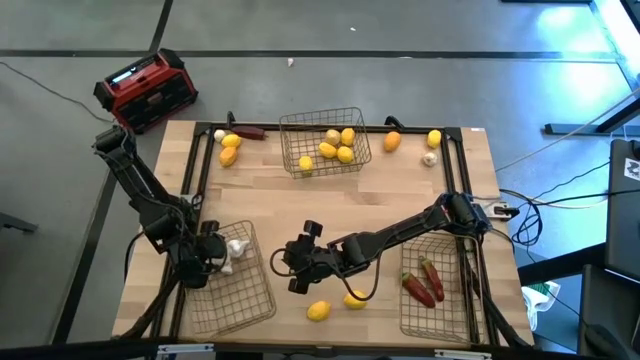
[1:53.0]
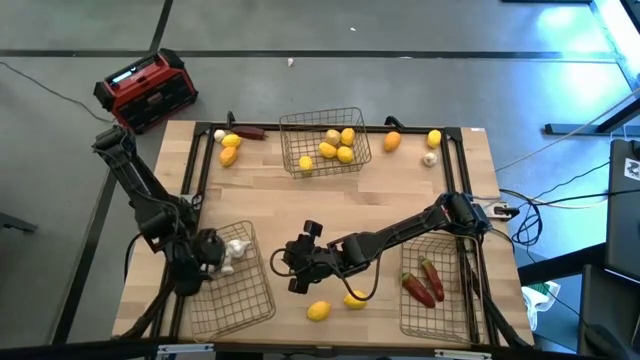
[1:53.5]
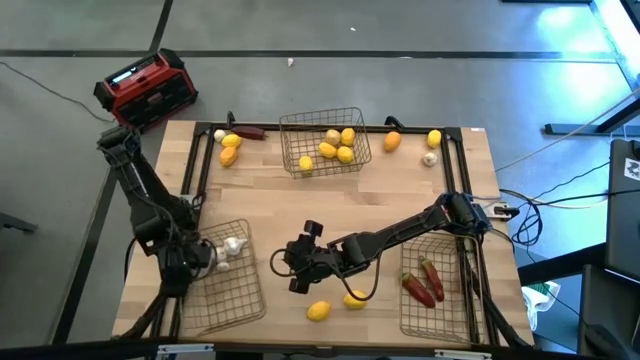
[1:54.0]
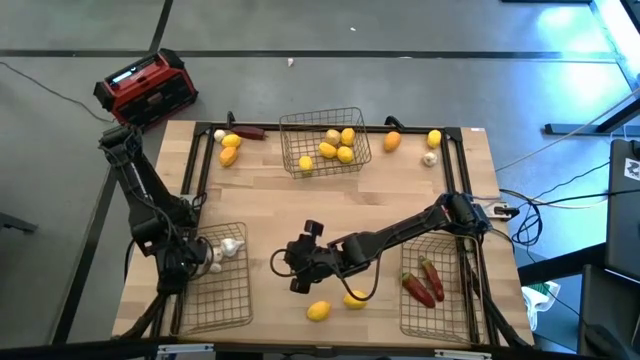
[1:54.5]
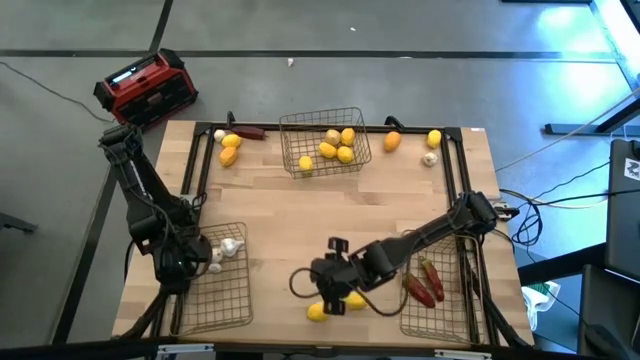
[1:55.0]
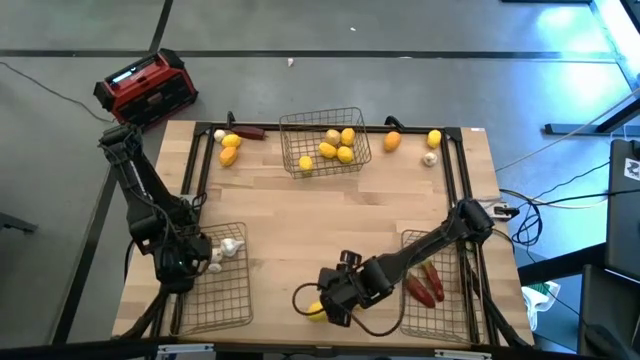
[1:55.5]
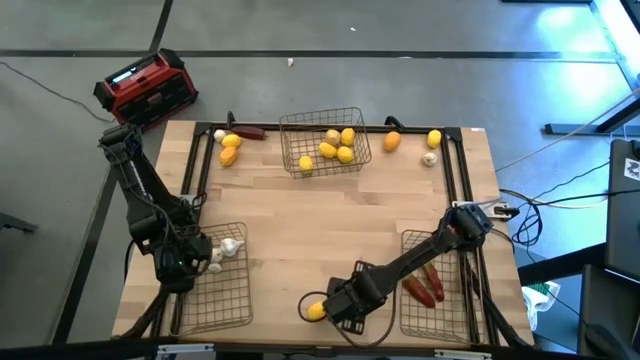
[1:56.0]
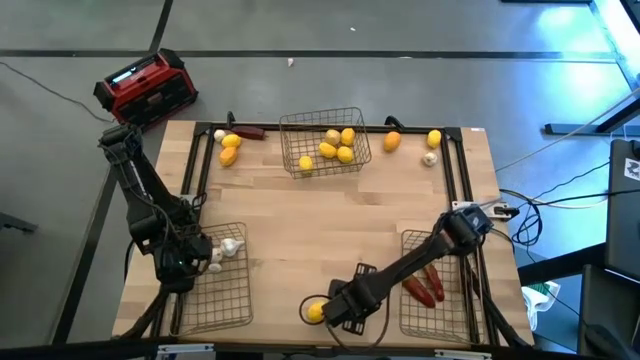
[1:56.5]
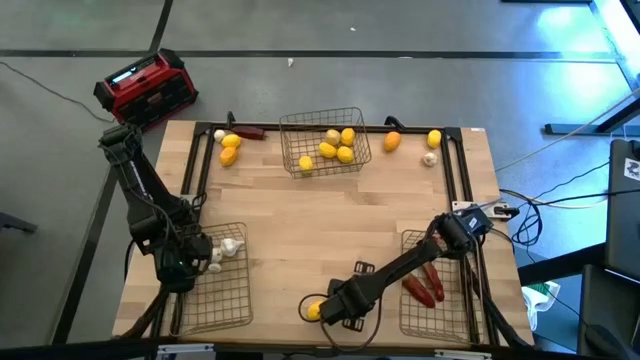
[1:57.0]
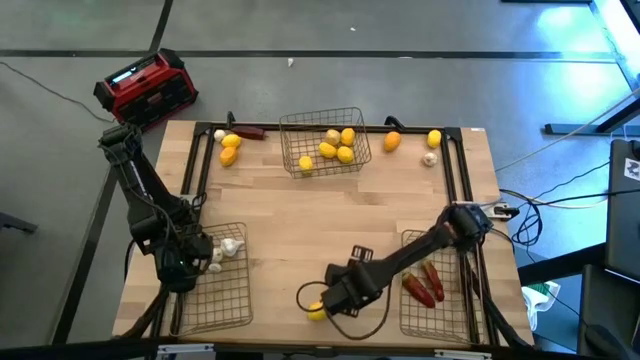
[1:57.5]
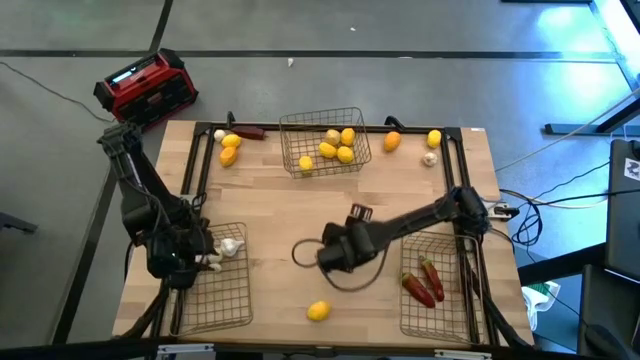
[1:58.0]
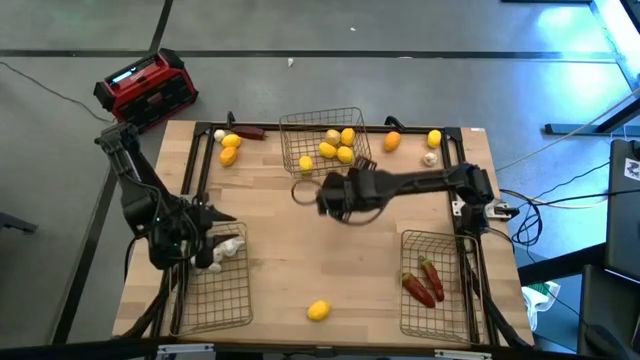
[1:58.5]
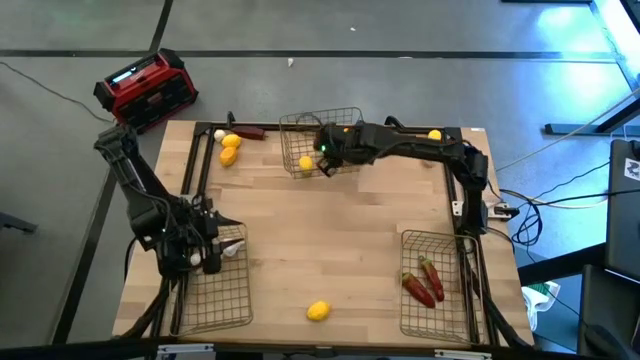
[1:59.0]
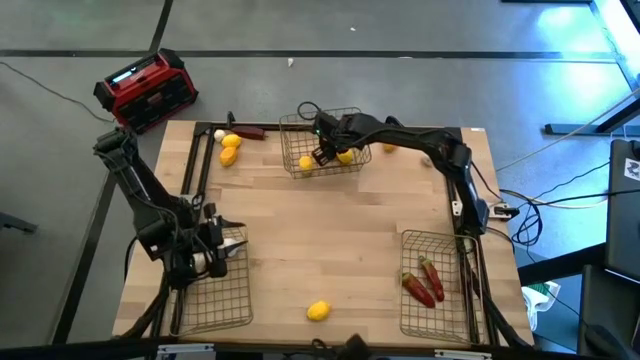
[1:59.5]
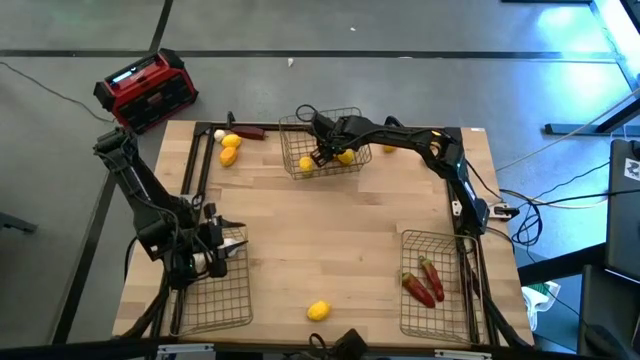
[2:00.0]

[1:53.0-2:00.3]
Task: Sort produce into baskets
Put the lemon into the top wire basket

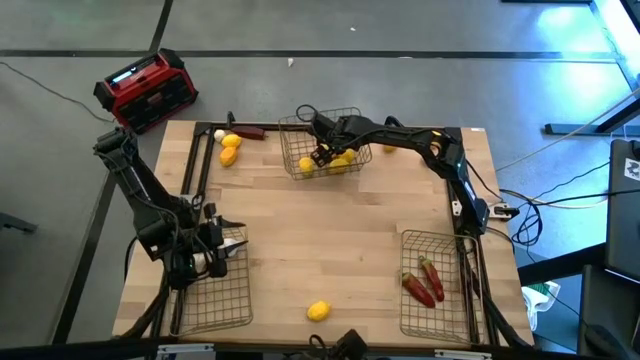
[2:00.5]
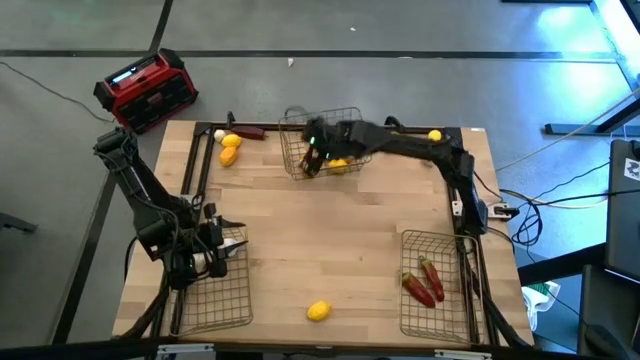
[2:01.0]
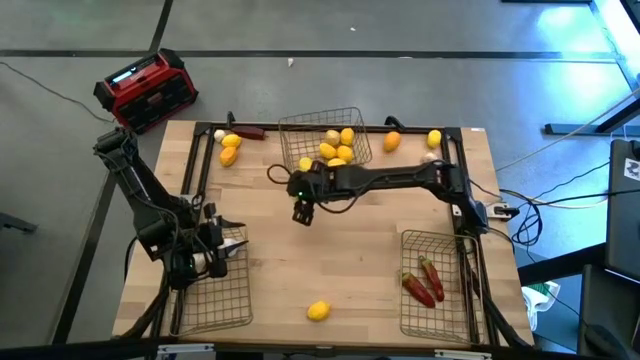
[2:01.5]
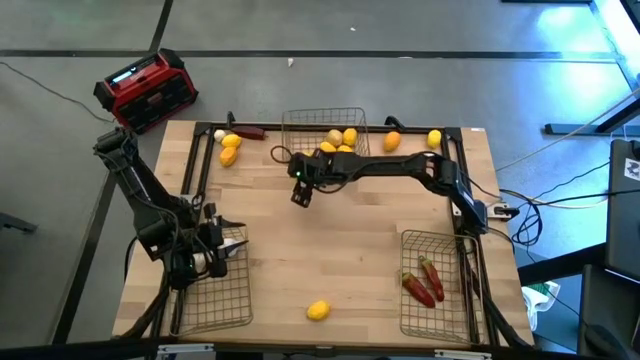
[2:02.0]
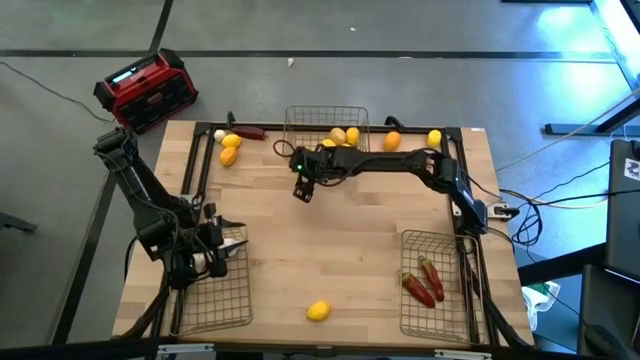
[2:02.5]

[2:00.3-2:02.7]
Adjust the top wire basket

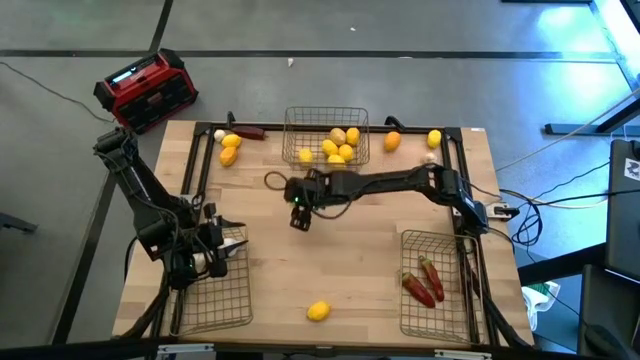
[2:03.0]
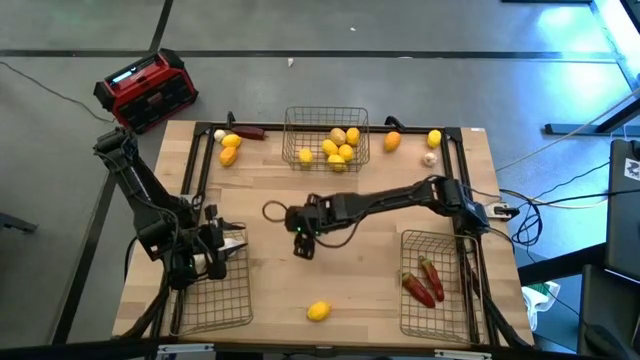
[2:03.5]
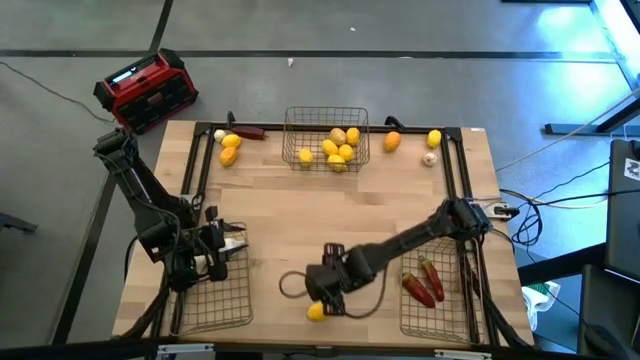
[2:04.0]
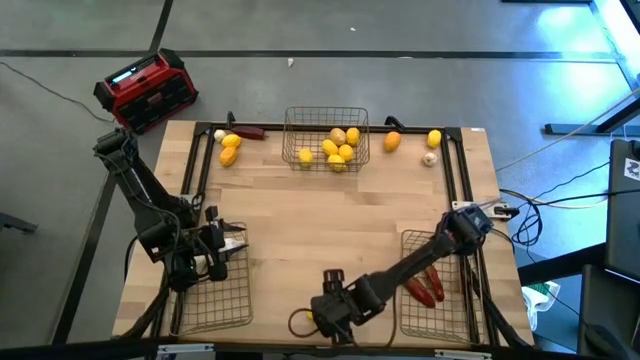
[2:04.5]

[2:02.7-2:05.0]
Put the lemon into the top wire basket

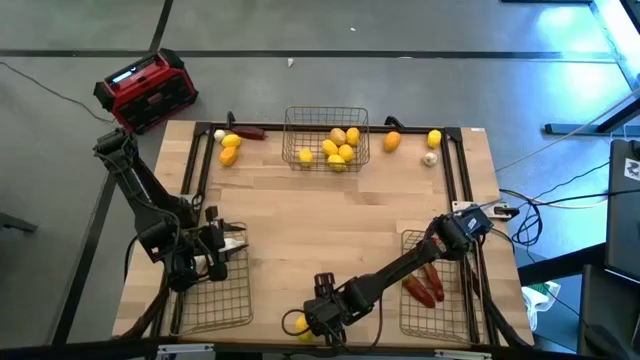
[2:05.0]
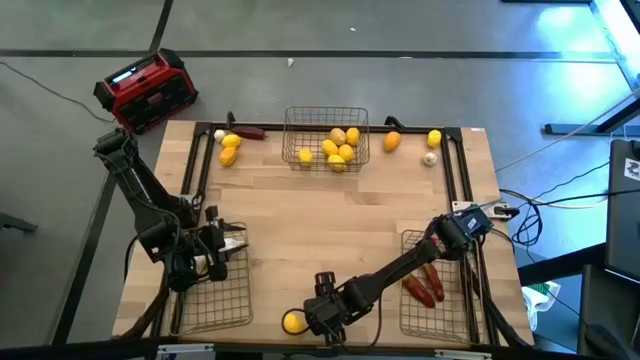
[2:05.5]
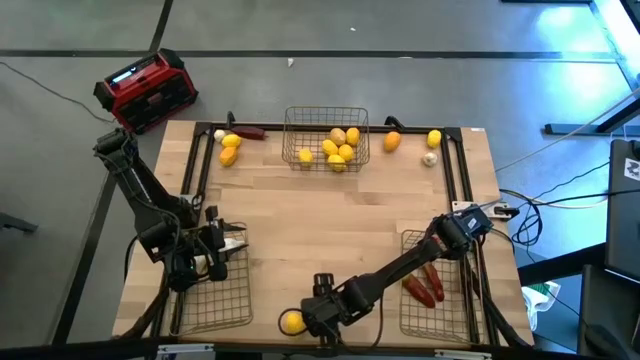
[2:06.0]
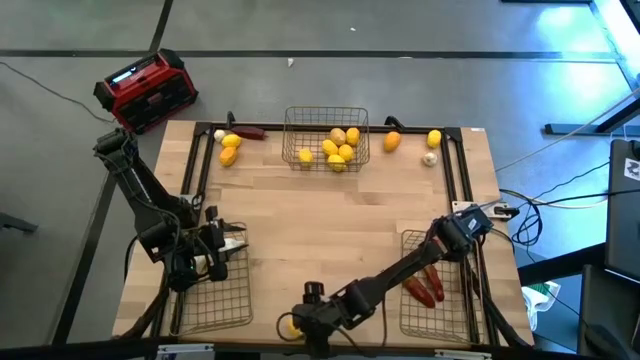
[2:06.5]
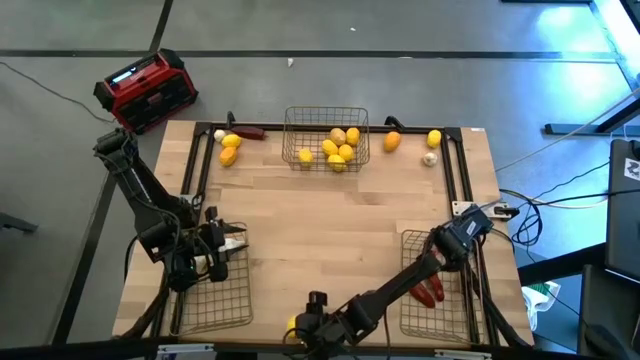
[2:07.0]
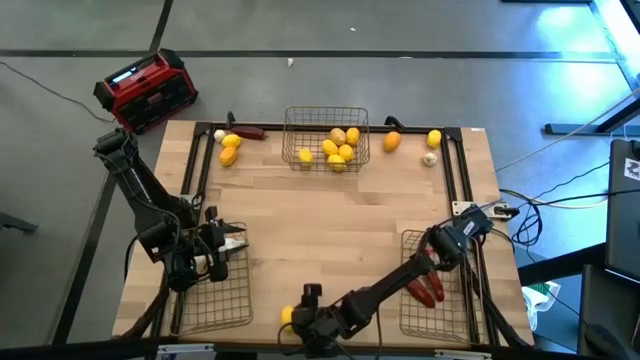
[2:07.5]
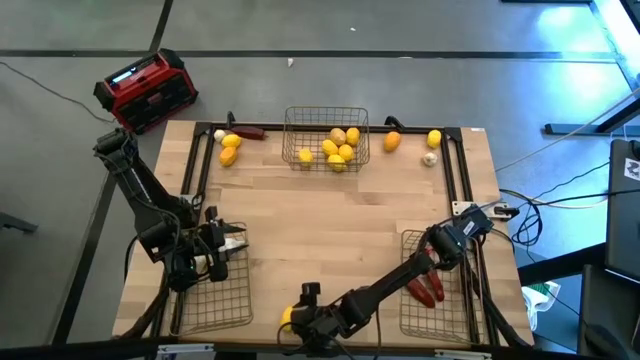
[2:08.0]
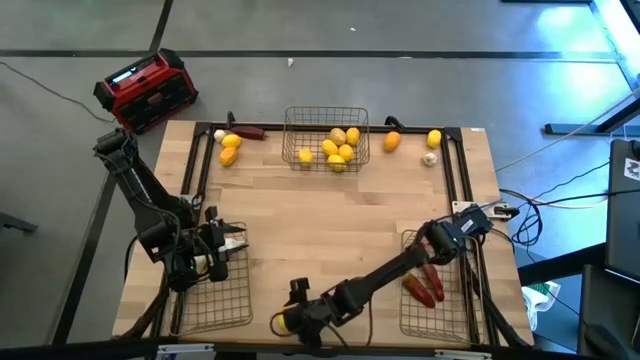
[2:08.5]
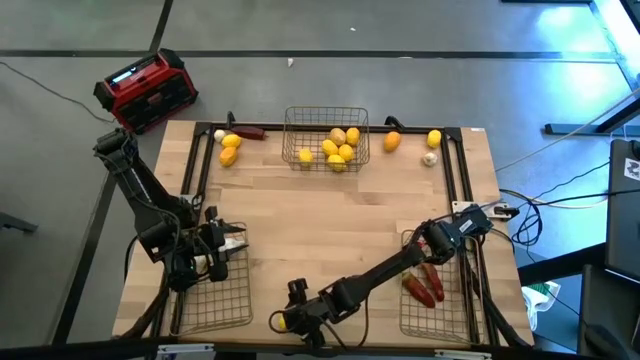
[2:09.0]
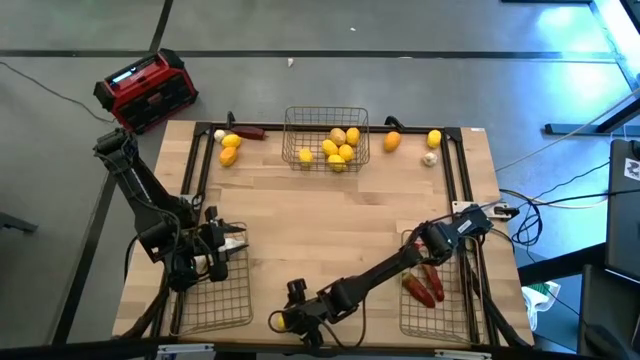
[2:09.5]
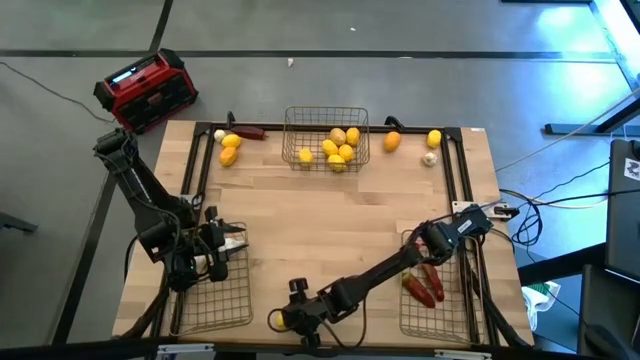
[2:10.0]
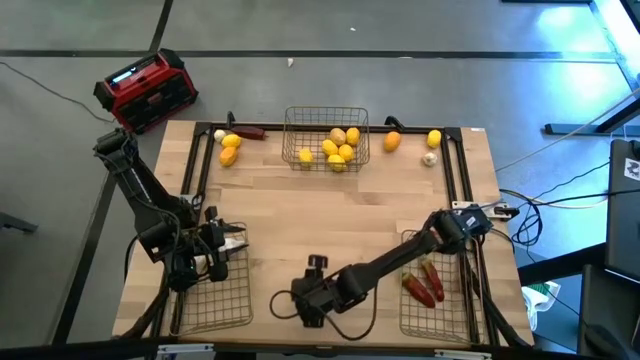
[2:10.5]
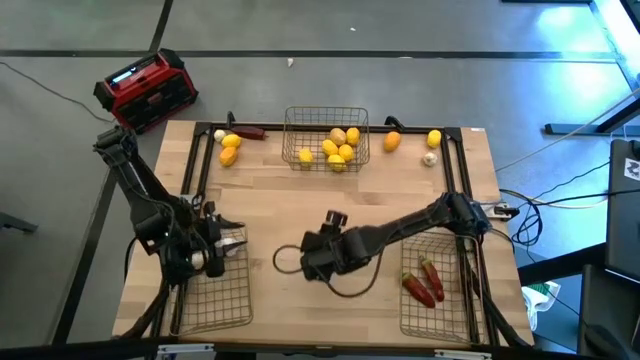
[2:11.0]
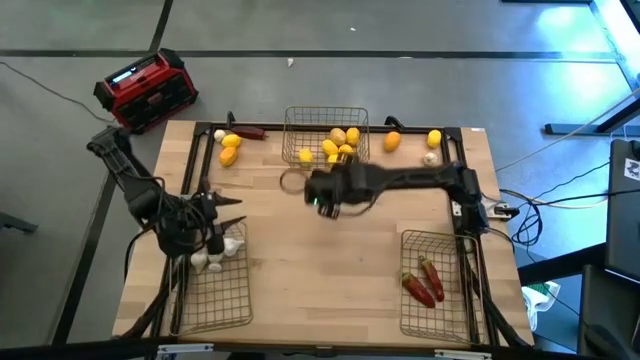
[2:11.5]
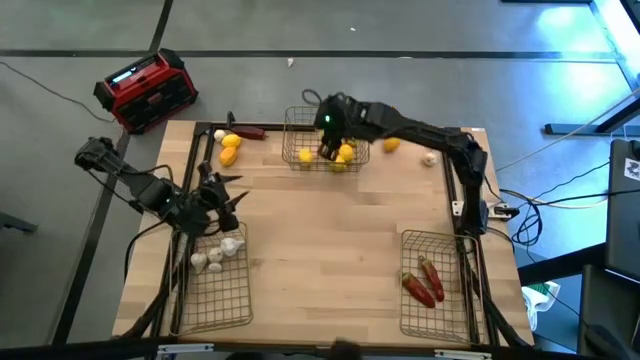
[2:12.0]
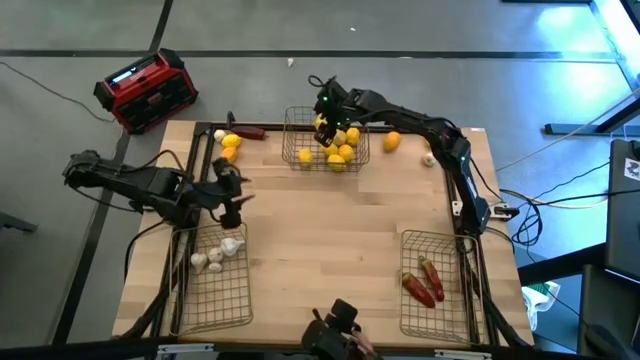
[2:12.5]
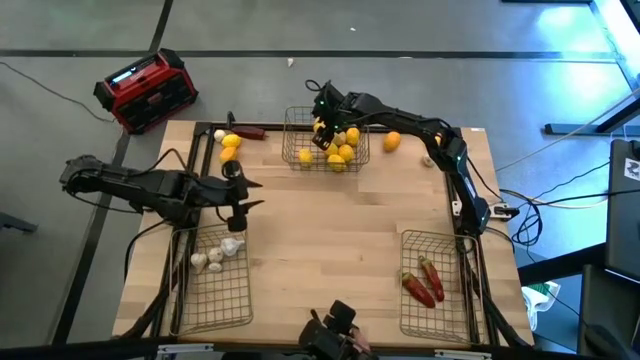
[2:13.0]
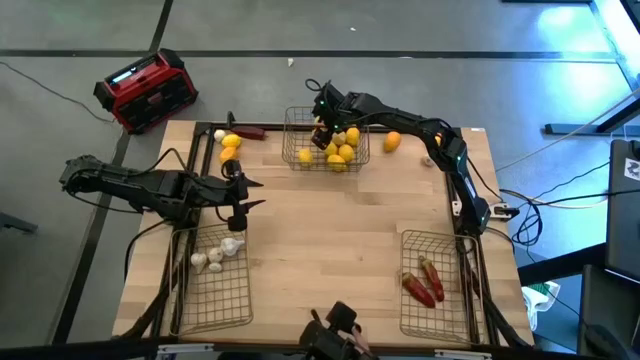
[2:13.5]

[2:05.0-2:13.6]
Put the lemon into the top wire basket
